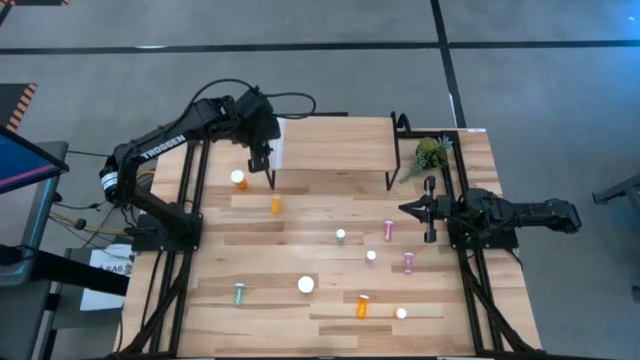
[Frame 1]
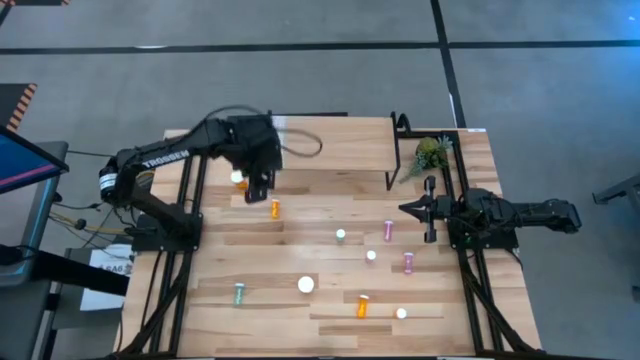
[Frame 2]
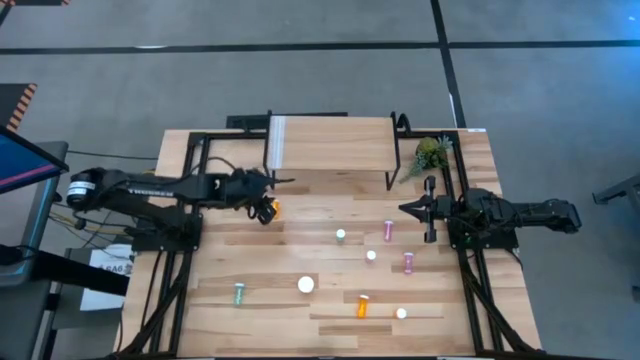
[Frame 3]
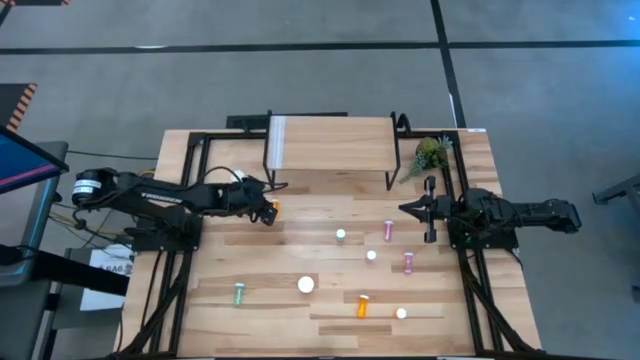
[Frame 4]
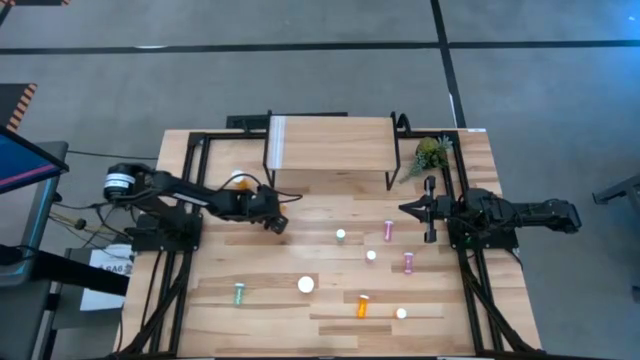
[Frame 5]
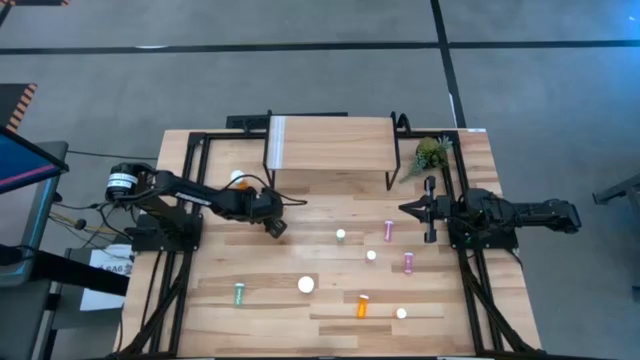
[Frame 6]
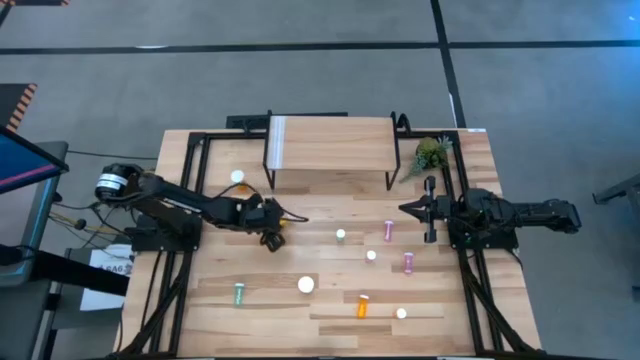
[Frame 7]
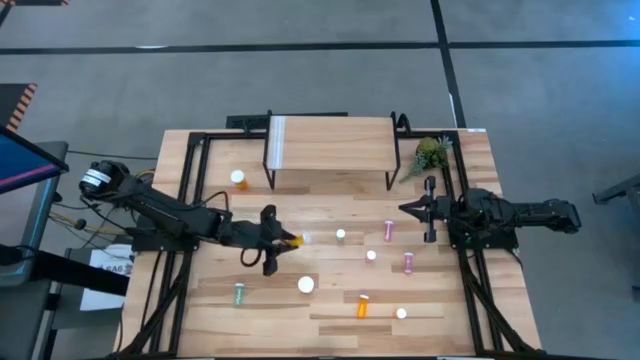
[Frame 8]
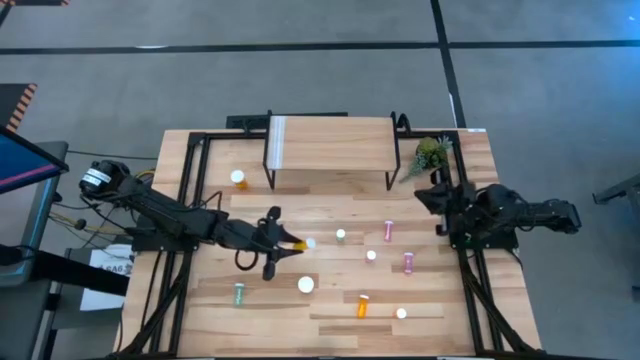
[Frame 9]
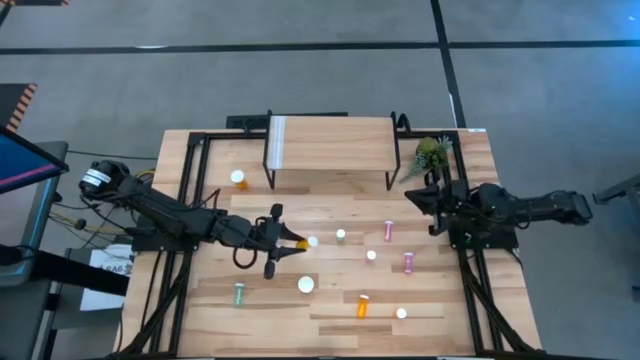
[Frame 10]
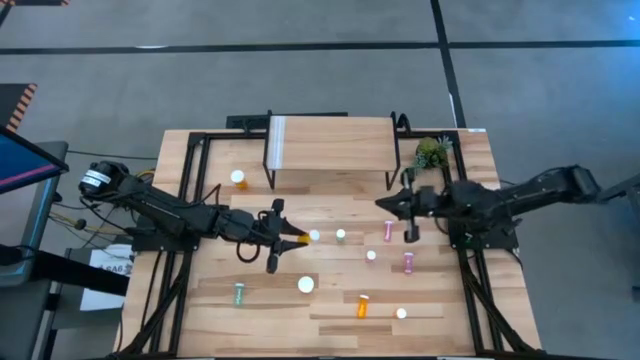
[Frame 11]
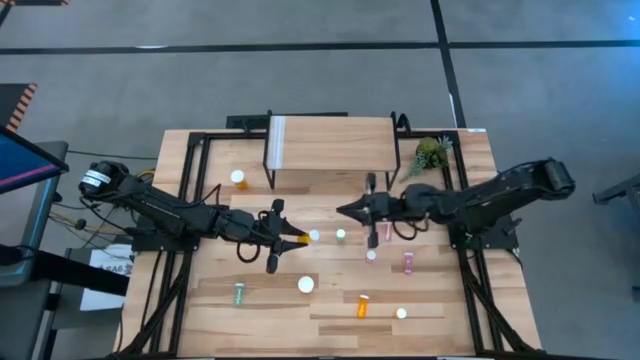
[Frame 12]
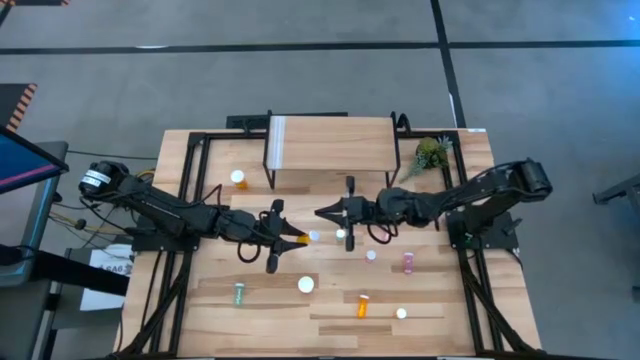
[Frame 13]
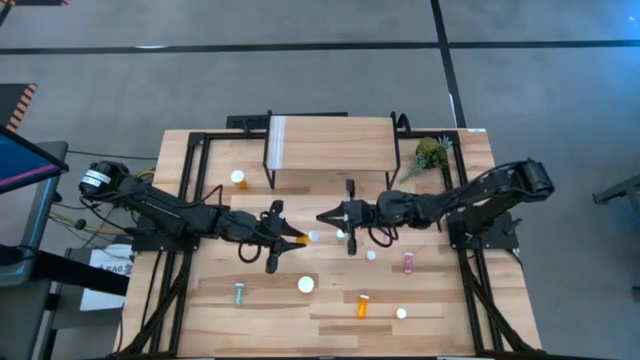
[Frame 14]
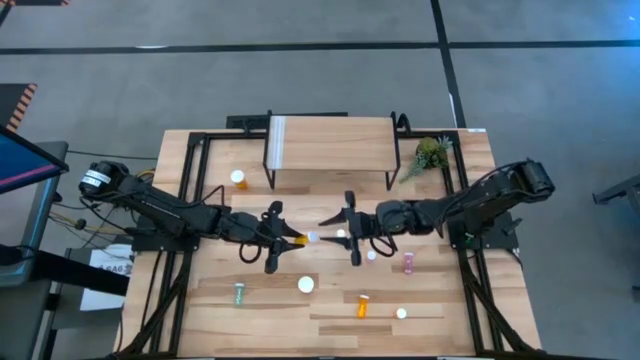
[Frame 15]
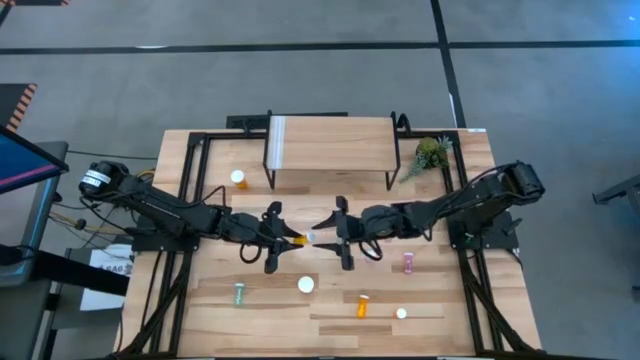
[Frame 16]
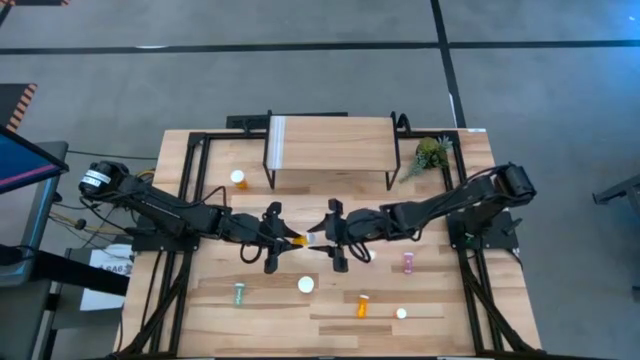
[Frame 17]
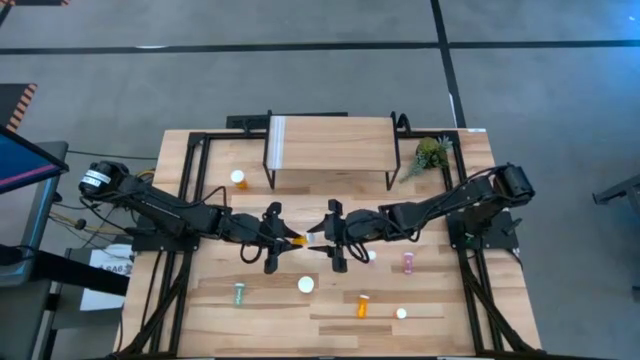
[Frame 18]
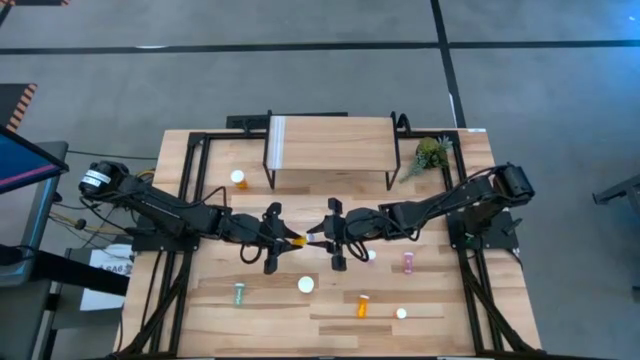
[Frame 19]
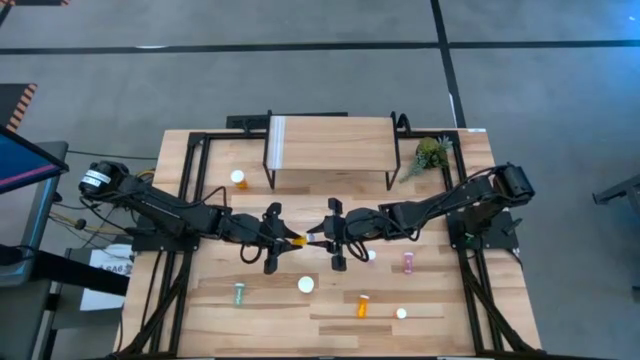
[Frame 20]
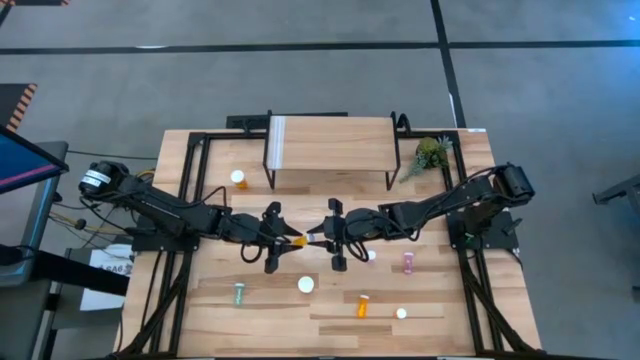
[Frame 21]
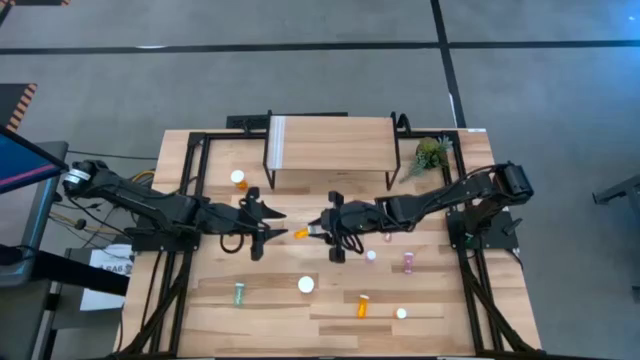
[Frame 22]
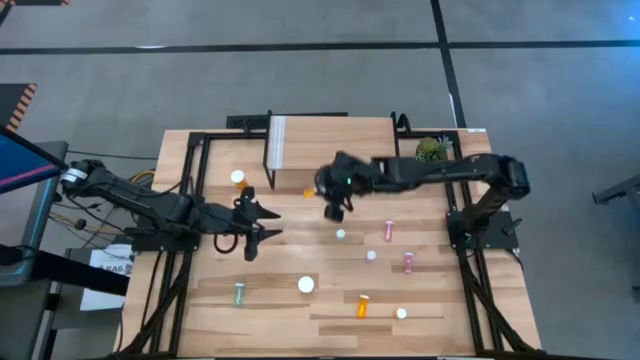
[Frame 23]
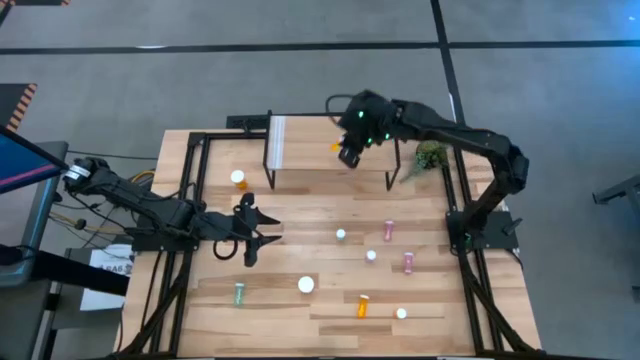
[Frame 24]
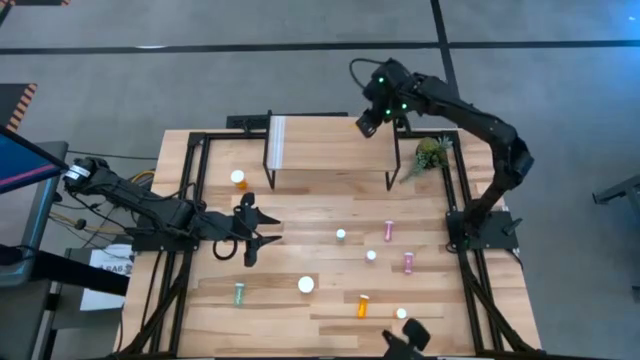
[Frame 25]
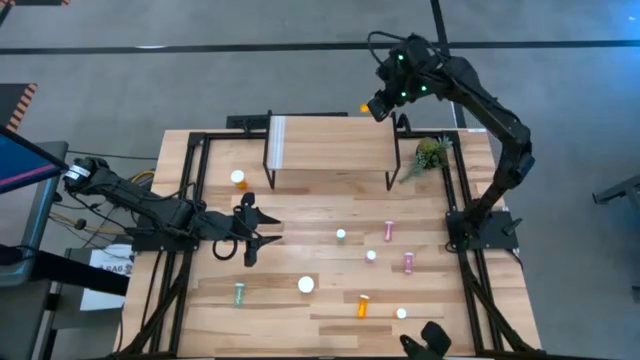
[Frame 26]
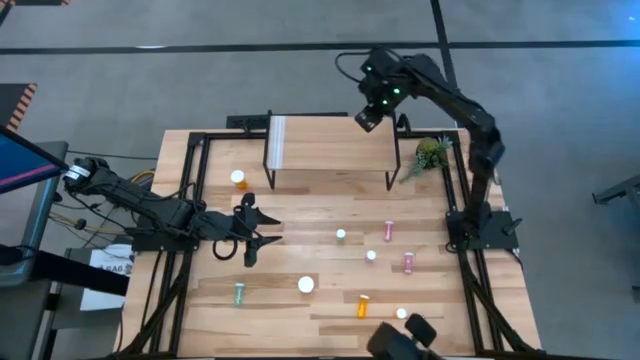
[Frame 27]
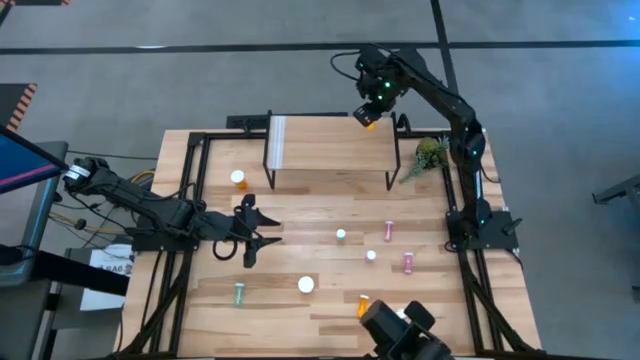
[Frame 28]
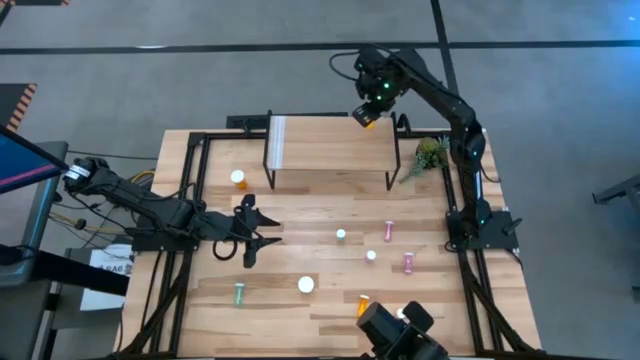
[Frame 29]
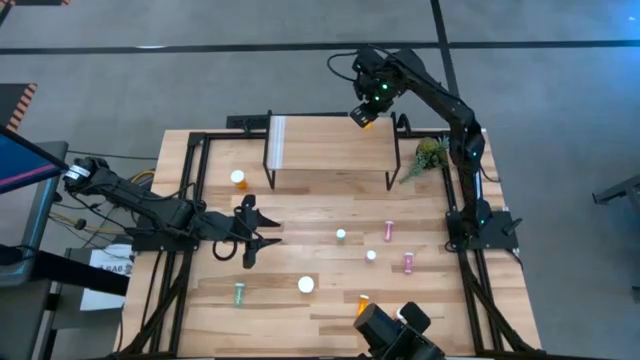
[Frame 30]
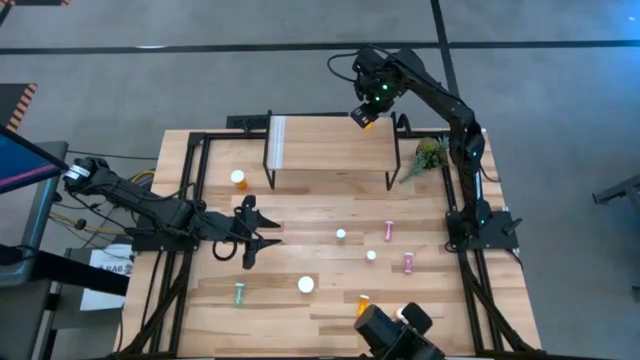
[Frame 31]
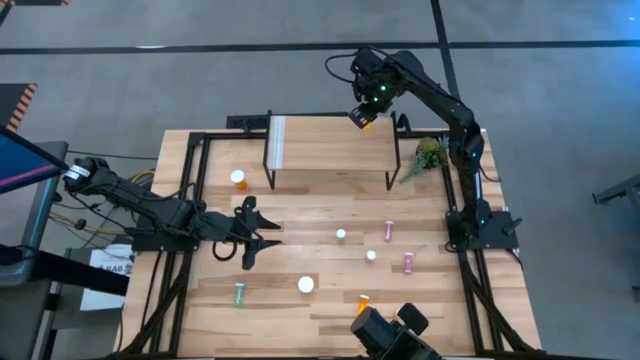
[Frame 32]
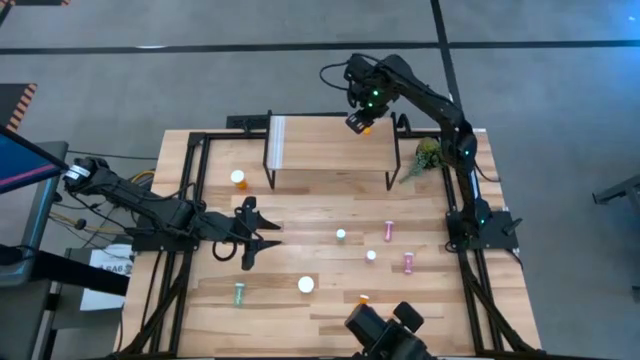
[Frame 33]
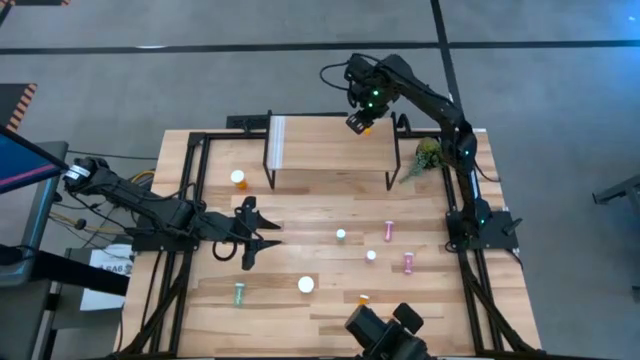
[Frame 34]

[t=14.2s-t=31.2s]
Task: Pick and place medicine bottles onto shelf by color
Put the top small orange pill bottle on the shelf

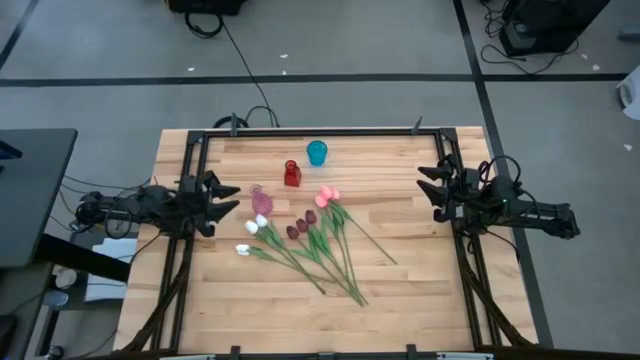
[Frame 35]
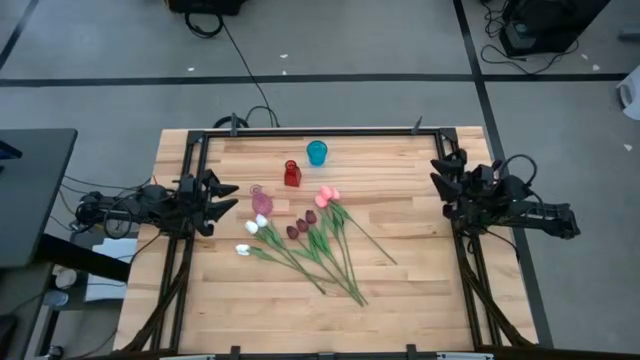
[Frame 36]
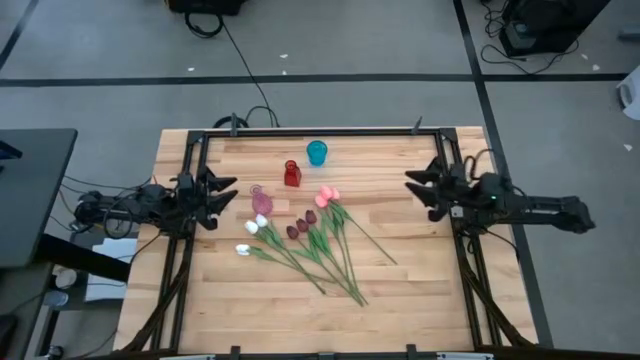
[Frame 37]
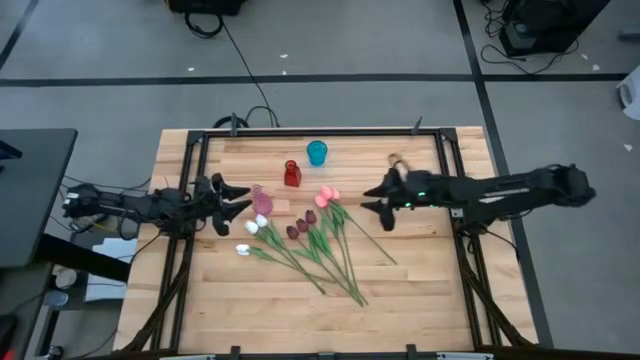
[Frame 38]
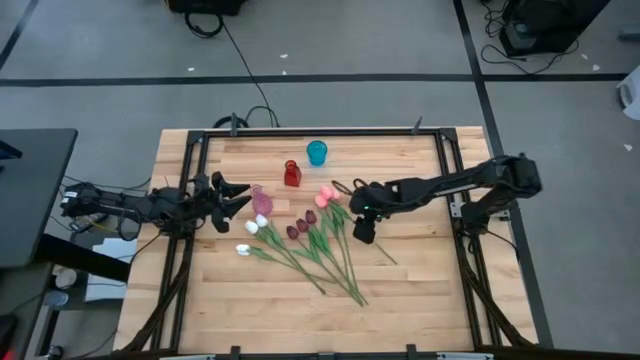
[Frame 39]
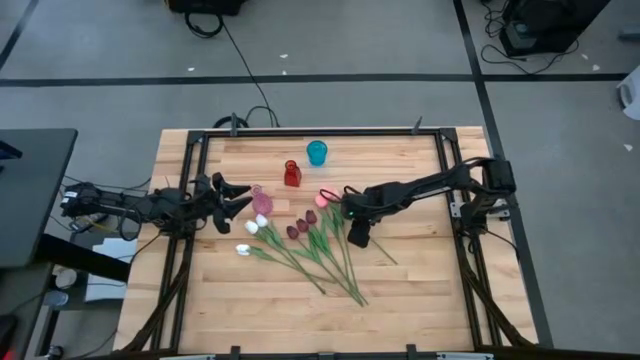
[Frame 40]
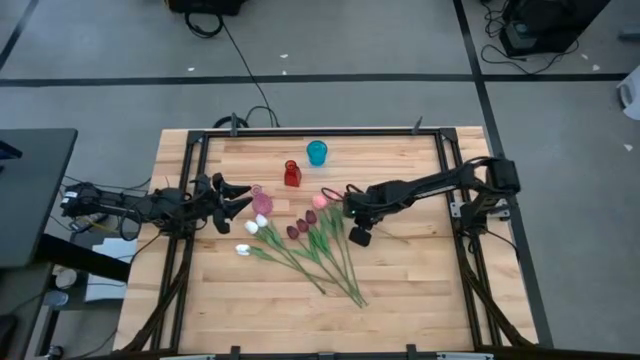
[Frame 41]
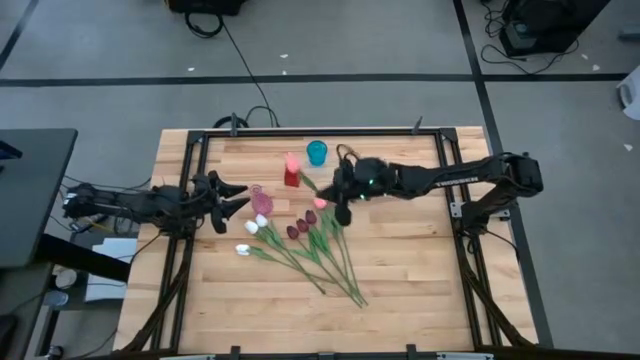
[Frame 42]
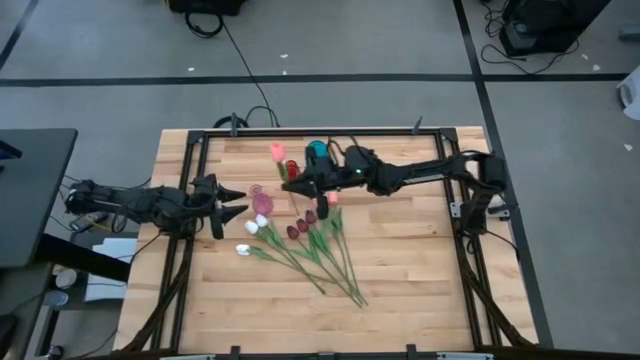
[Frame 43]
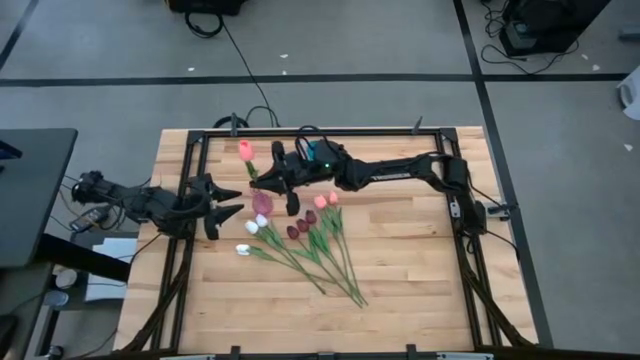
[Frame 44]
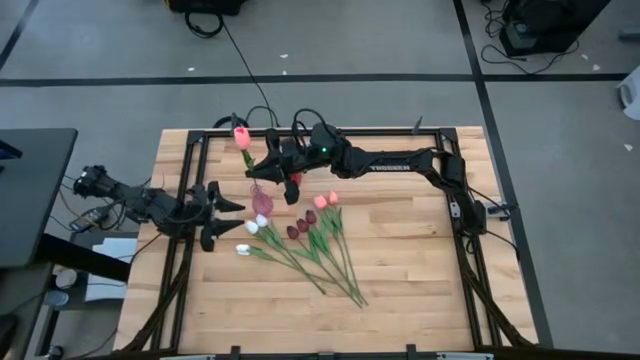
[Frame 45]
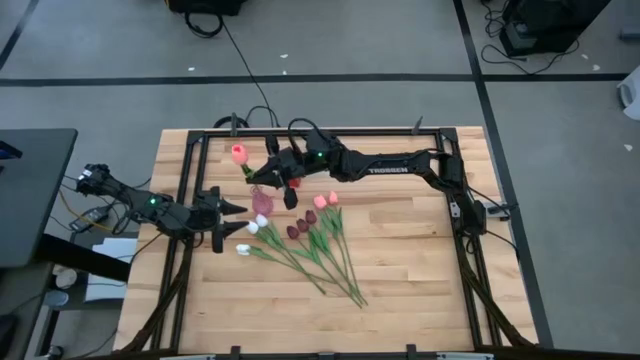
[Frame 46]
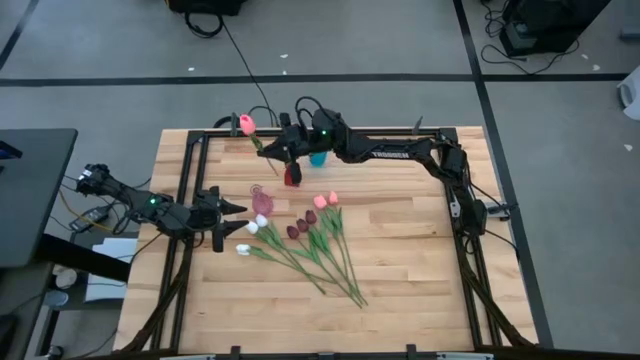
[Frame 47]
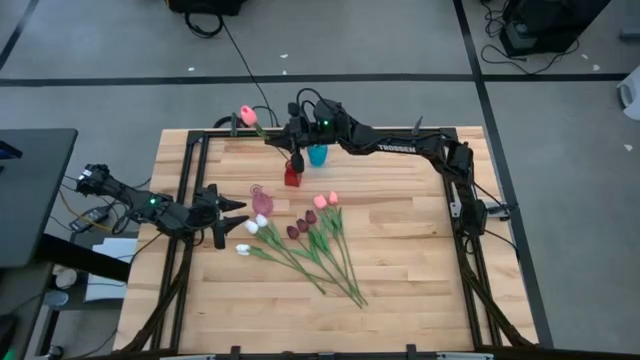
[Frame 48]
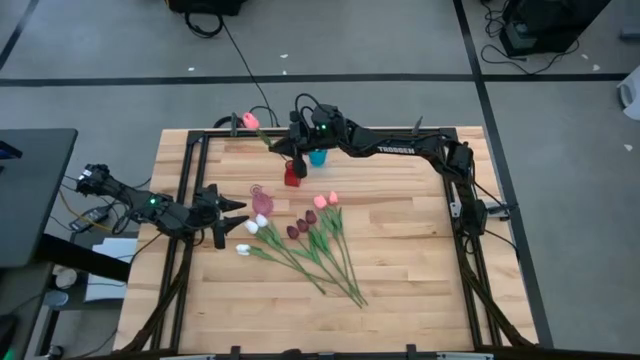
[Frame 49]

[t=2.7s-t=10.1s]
Task: Sort flowers into vase by color
Put the pink tulip into the red vase
